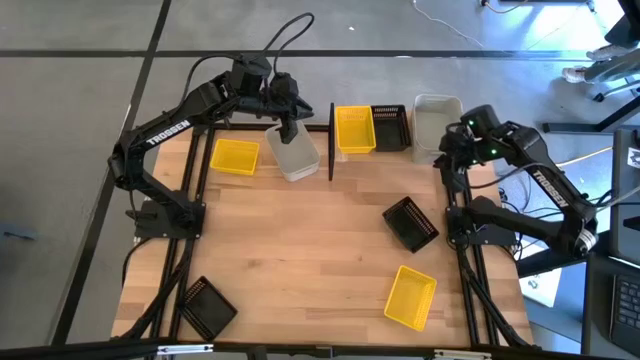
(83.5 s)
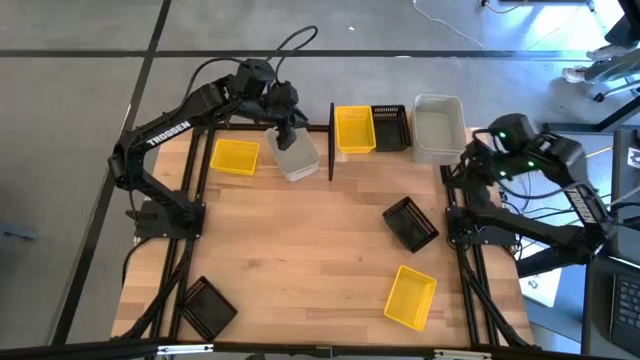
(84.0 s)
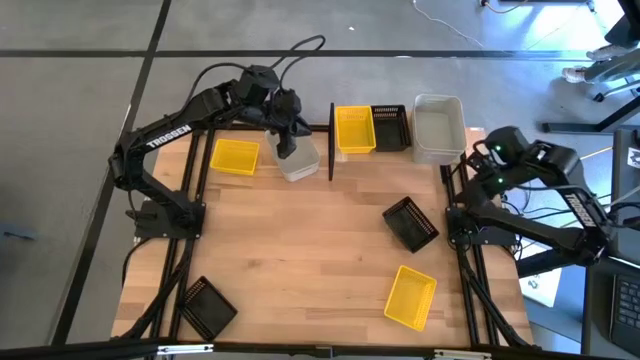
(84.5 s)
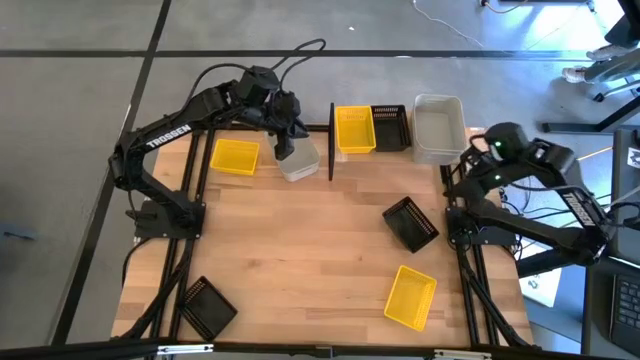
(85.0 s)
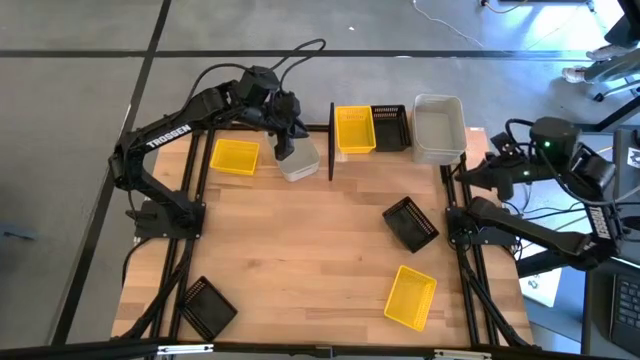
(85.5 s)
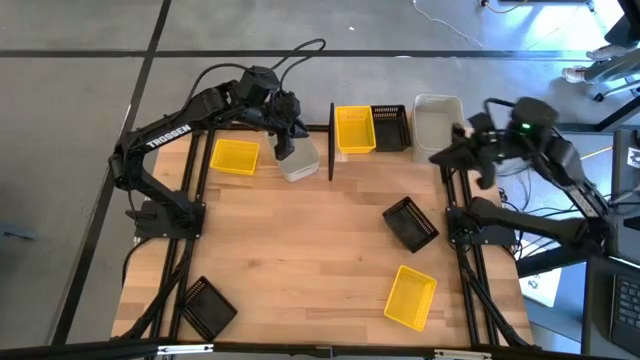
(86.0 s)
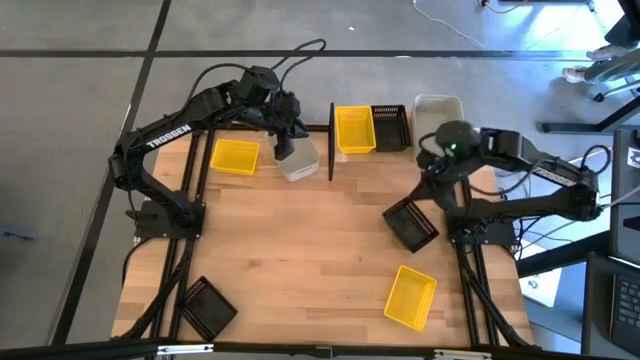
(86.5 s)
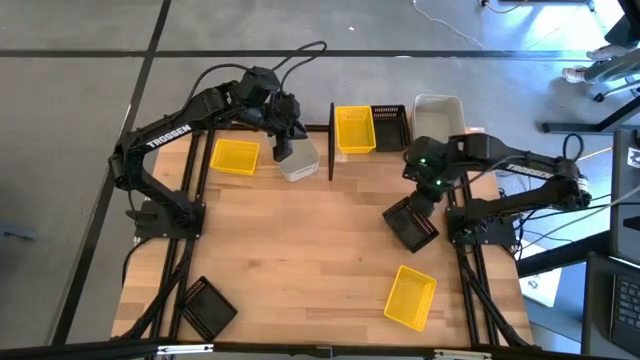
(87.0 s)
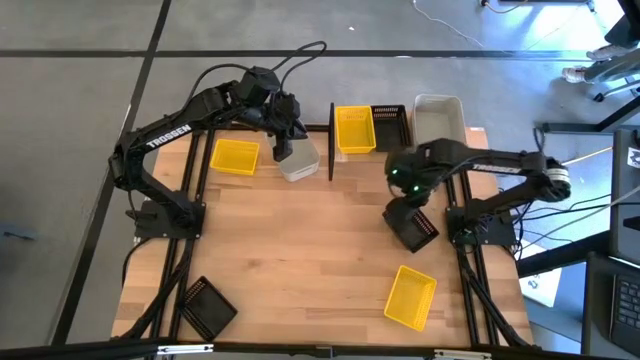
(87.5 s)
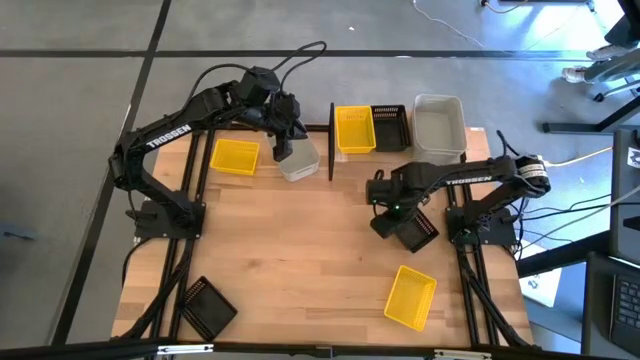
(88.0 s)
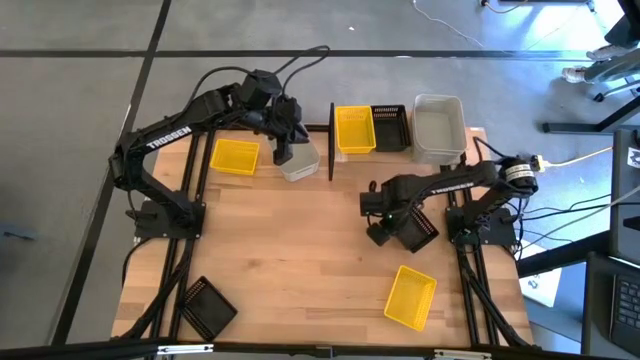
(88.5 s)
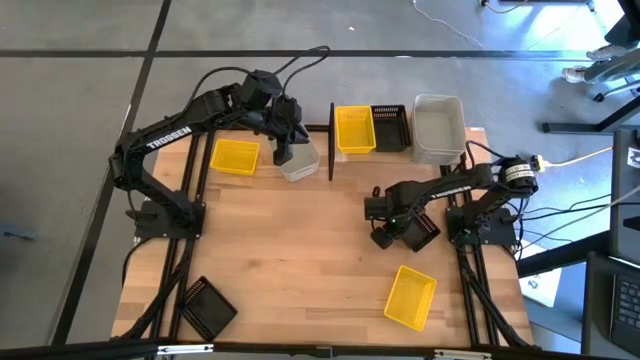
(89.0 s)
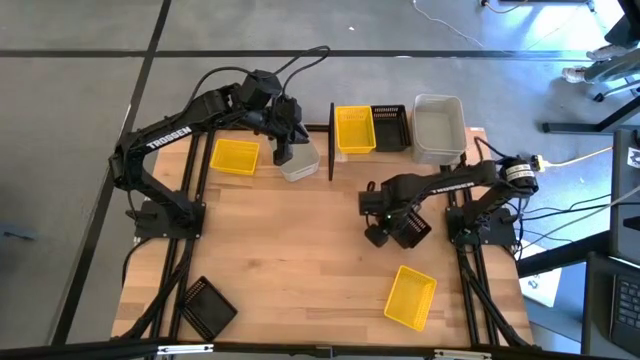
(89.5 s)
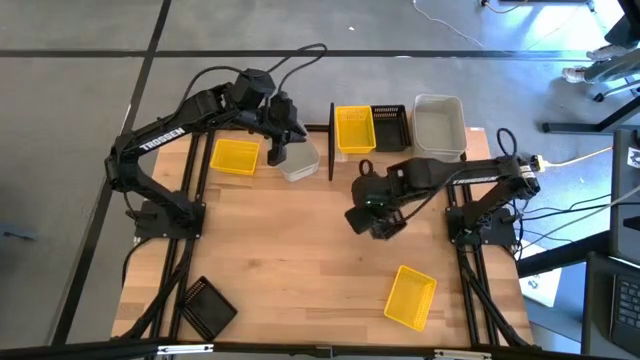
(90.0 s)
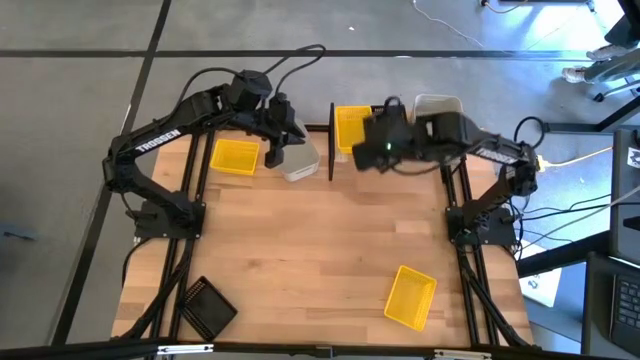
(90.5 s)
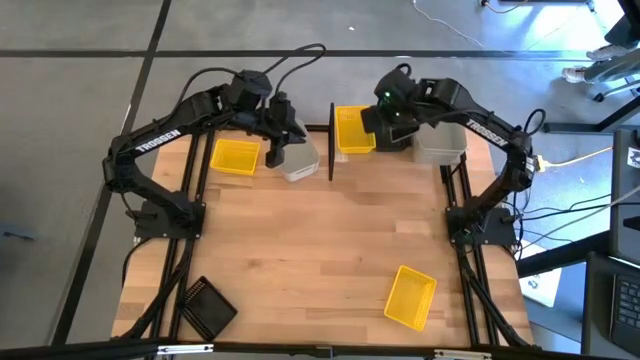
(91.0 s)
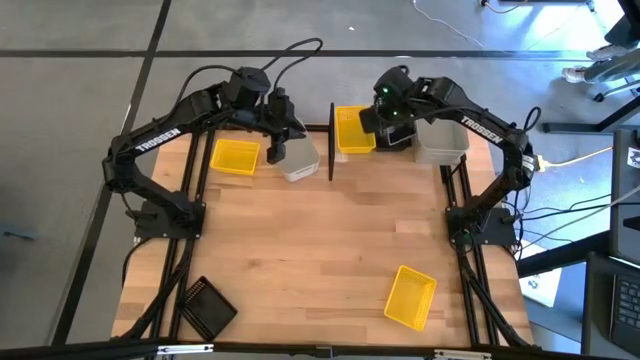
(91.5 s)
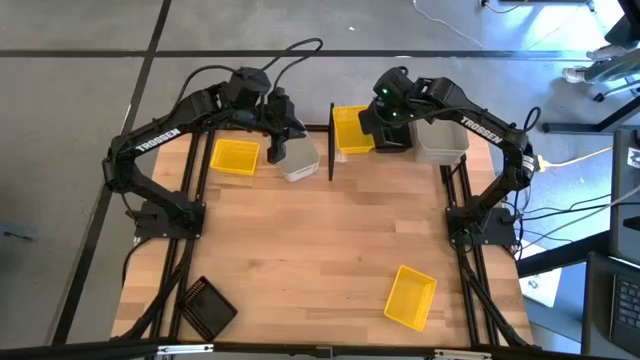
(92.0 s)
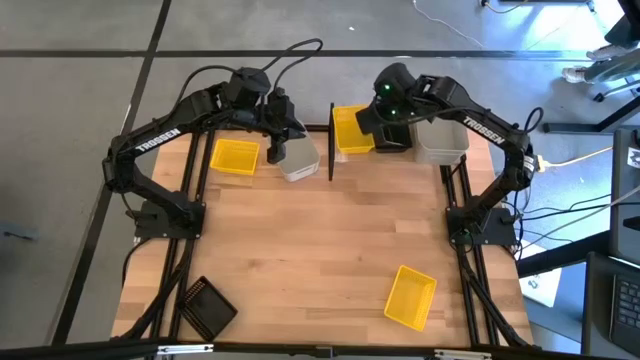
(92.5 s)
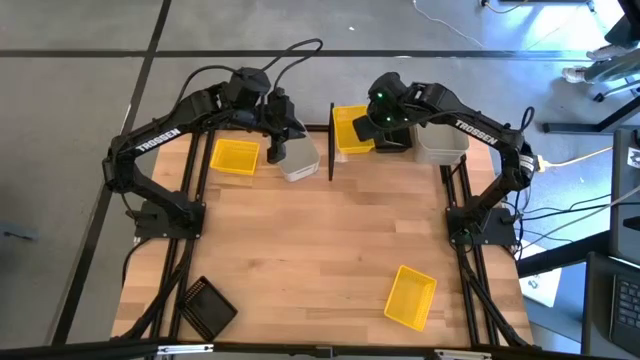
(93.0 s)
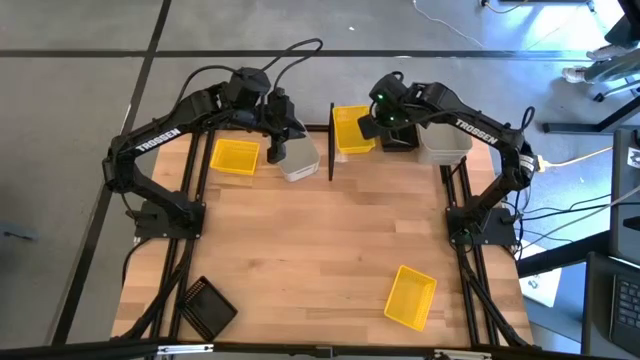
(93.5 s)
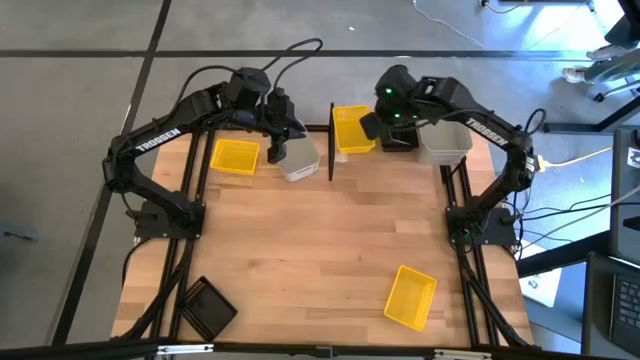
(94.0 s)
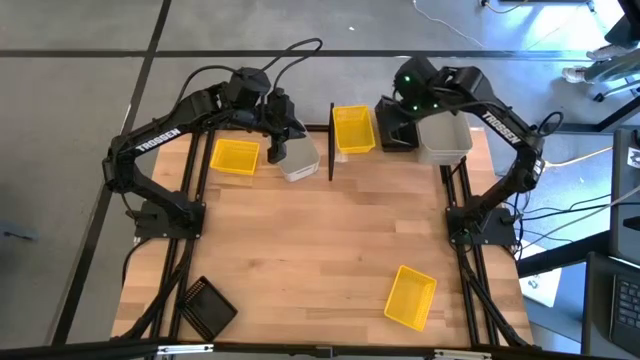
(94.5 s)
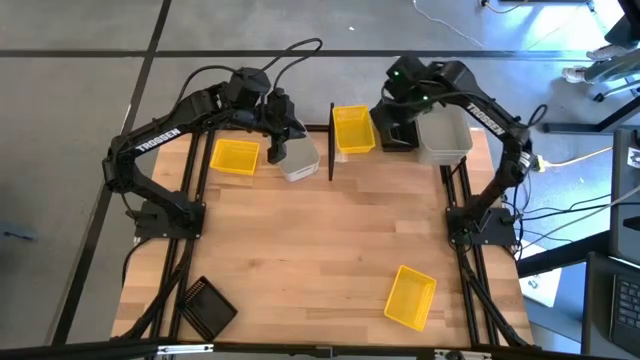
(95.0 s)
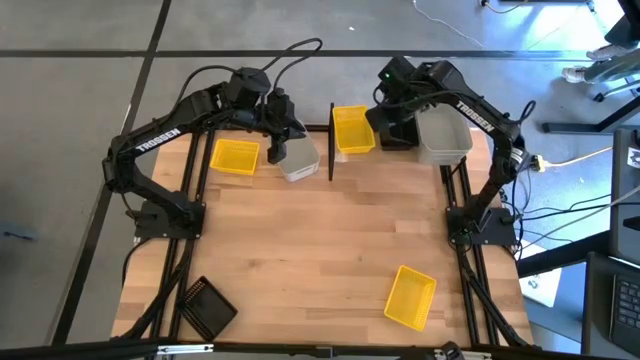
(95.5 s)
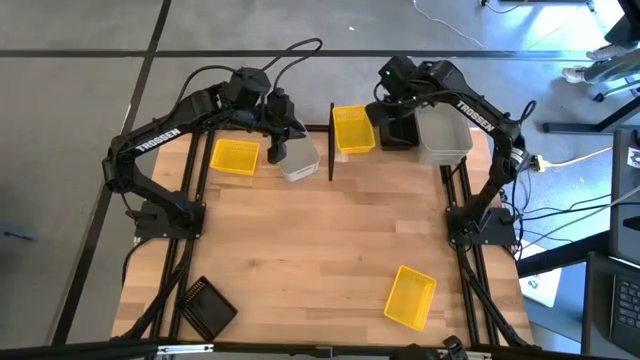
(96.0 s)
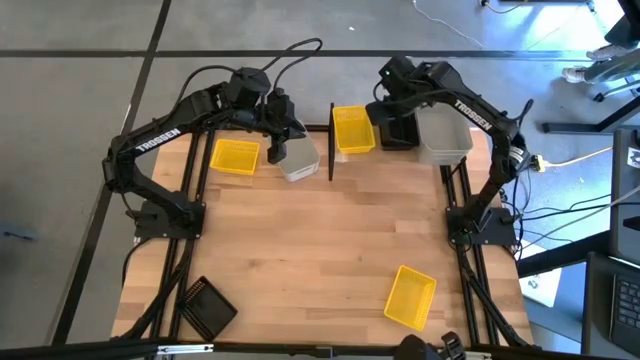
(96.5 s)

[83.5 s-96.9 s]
Task: Stack baskets on shelf by color
Stack the black bin on top of the black bin on the shelf

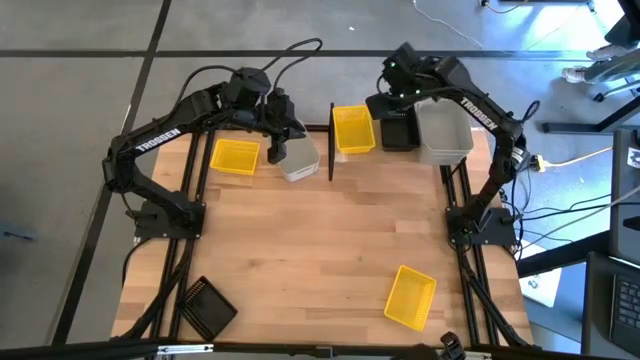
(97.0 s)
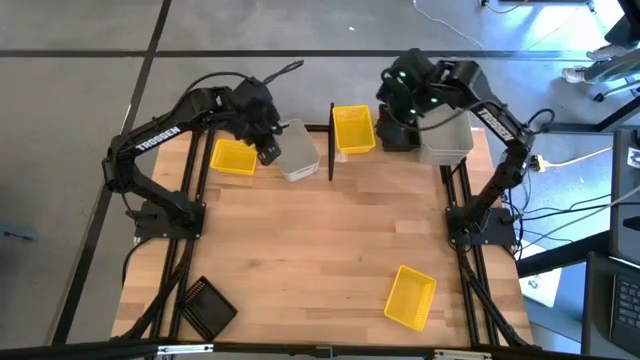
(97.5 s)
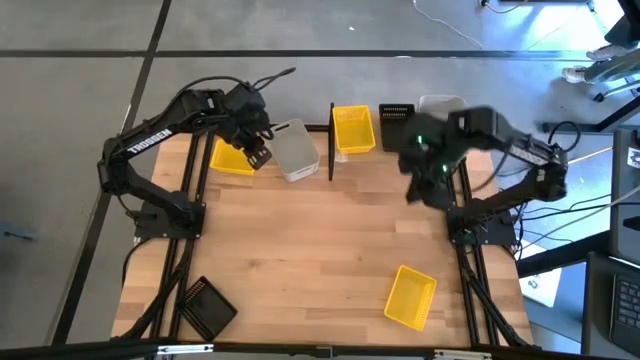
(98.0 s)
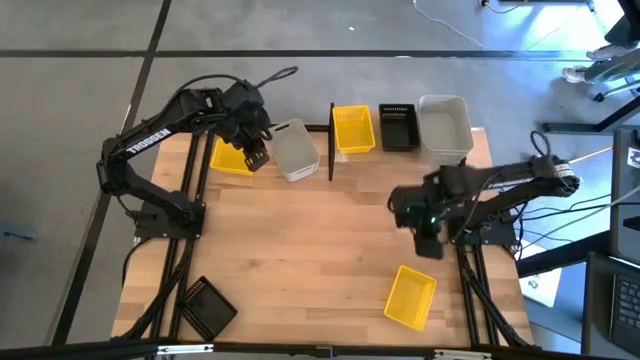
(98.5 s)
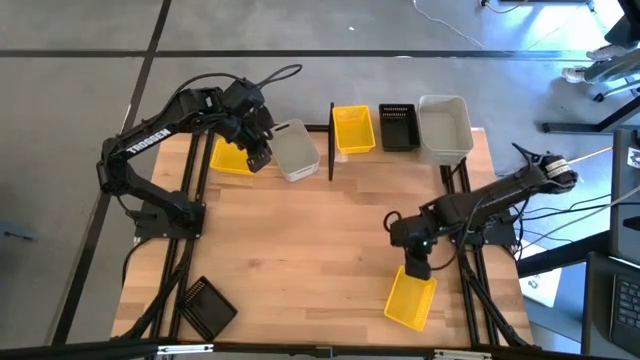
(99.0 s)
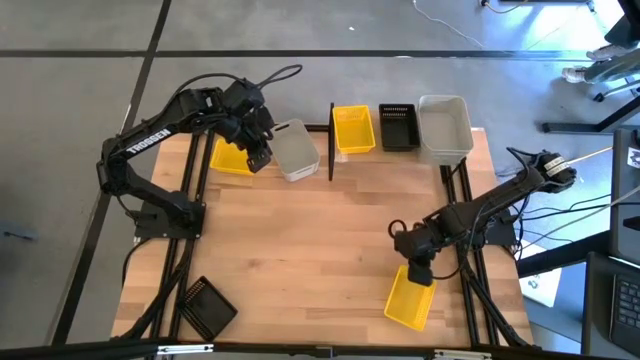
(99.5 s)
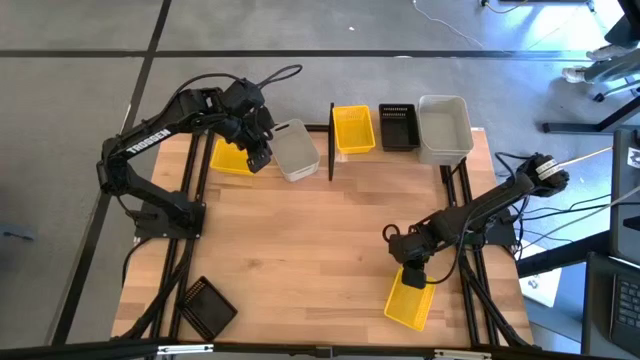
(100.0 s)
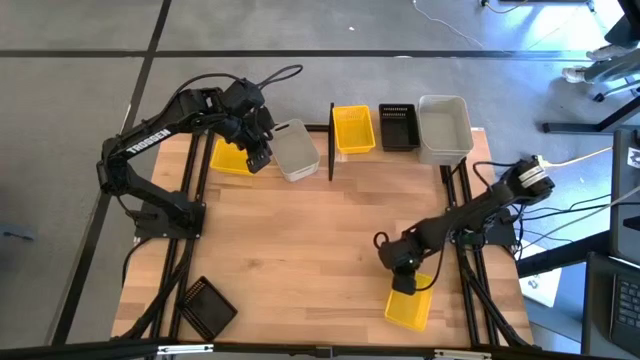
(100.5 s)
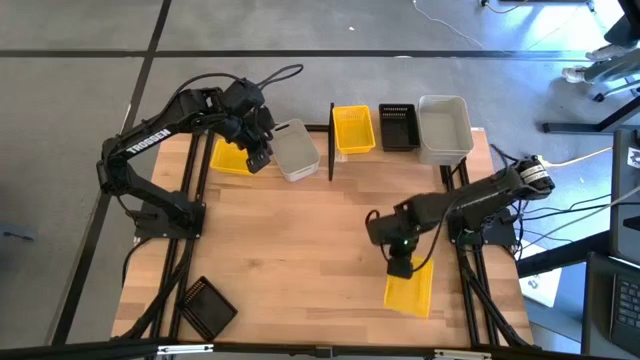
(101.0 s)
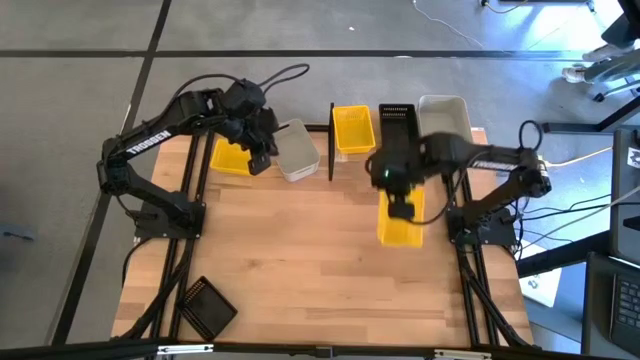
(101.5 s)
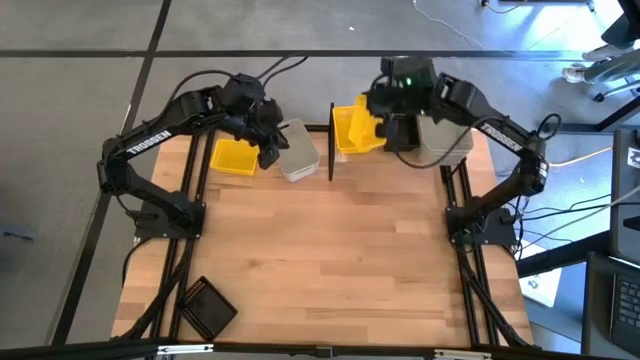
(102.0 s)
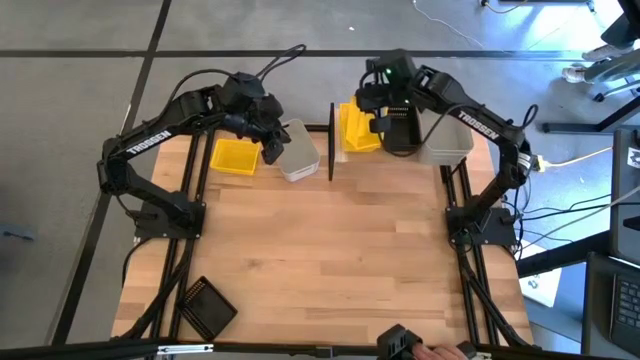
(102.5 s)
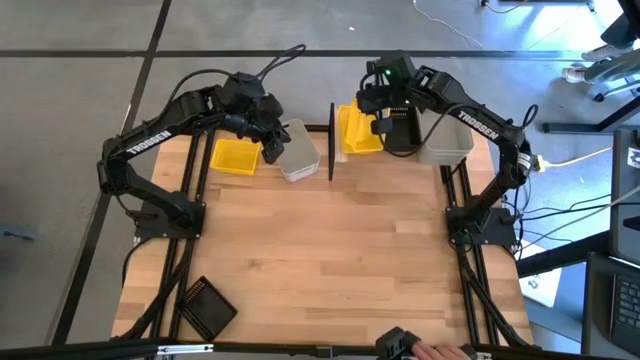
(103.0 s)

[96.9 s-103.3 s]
Stack the yellow bin on top of the yellow bin on the shelf

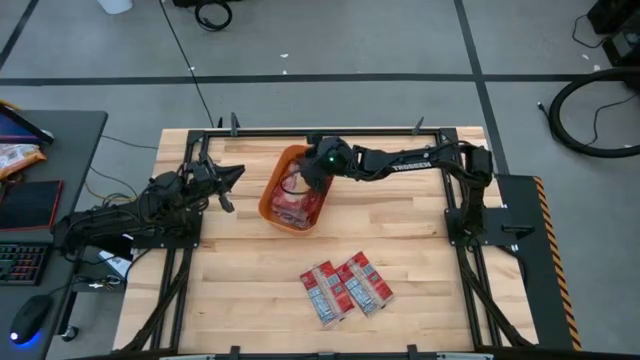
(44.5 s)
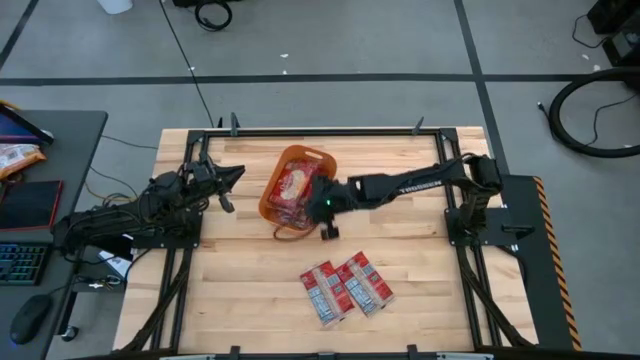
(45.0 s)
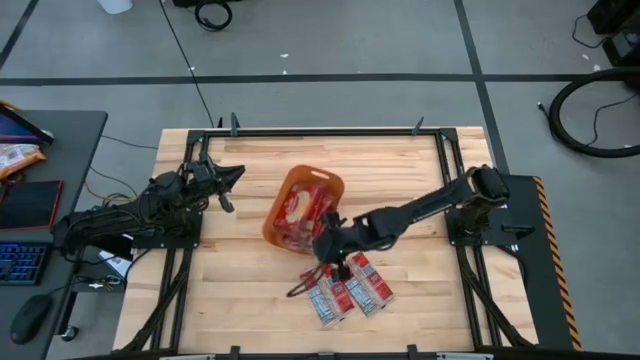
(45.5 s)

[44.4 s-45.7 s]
Task: Sort popcorn bags into baskets
Adjust the orange bin on the table

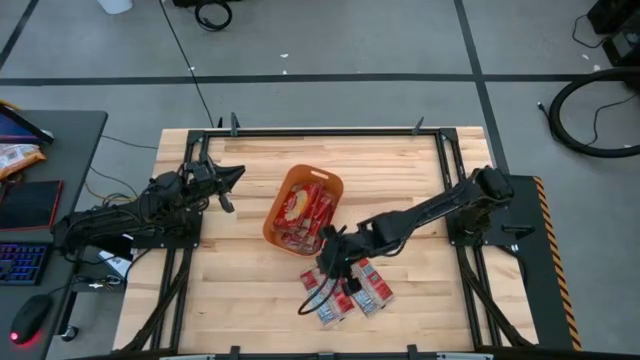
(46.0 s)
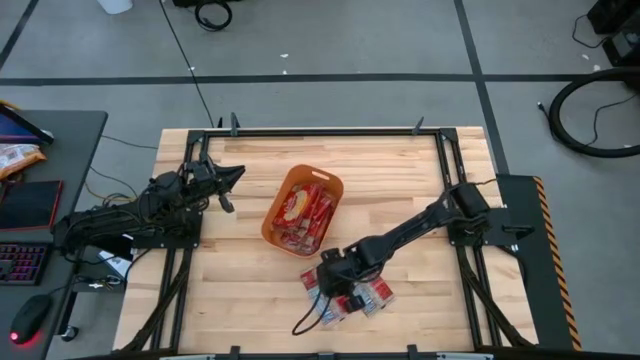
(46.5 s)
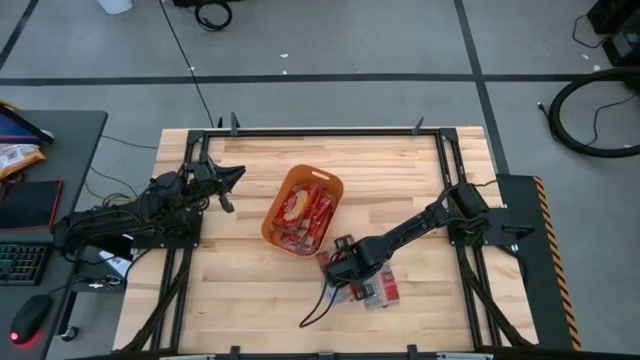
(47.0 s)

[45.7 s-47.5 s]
Move the red popcorn bag to the middle of the table
